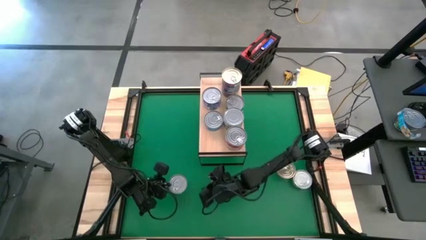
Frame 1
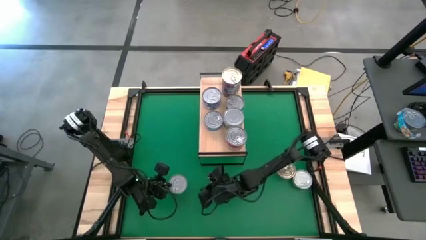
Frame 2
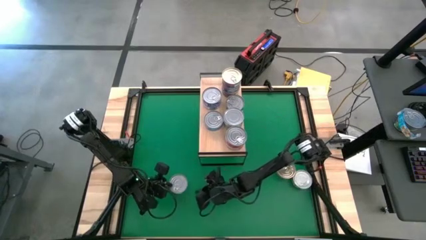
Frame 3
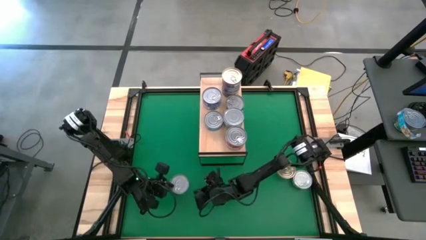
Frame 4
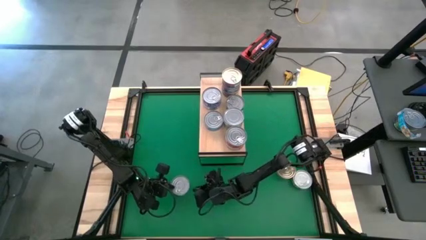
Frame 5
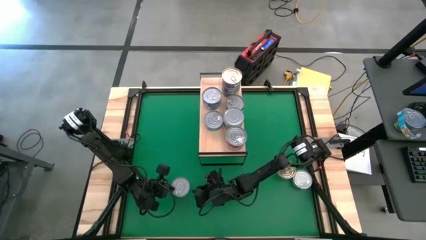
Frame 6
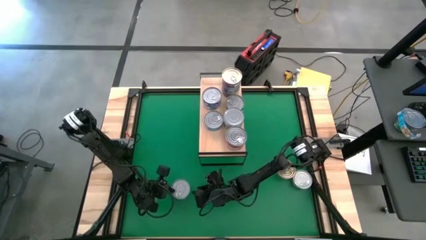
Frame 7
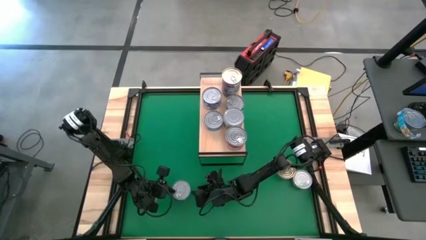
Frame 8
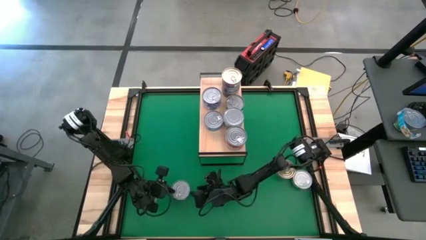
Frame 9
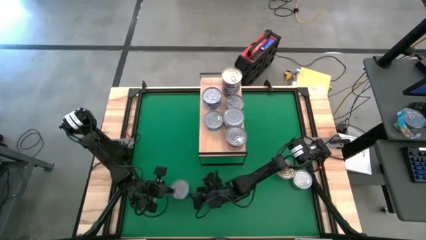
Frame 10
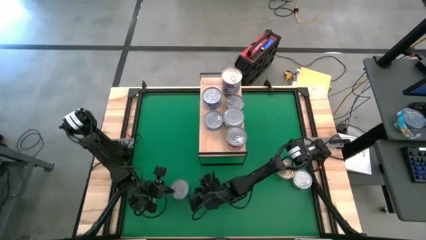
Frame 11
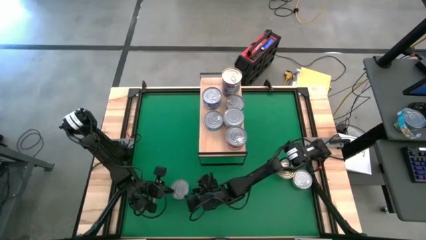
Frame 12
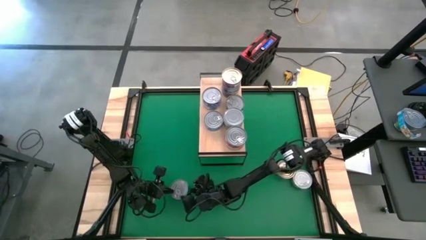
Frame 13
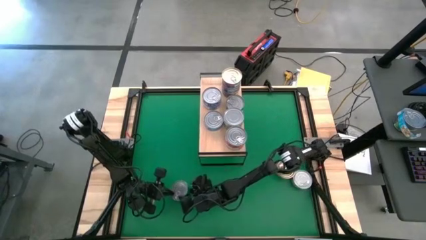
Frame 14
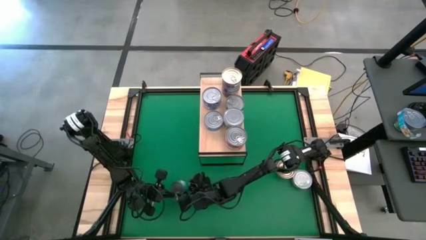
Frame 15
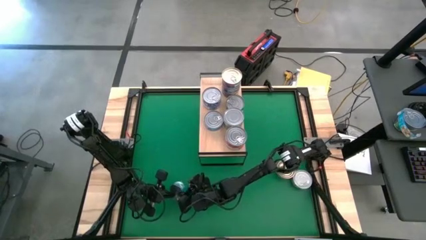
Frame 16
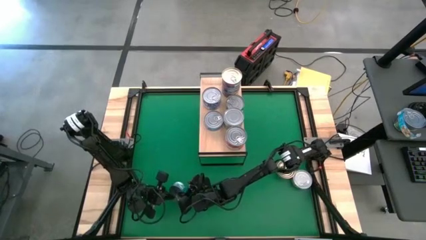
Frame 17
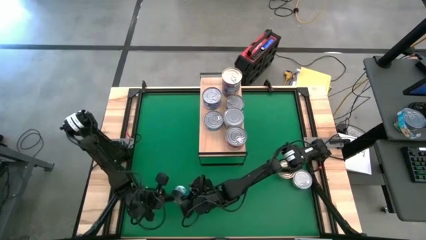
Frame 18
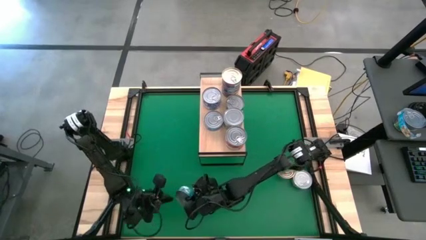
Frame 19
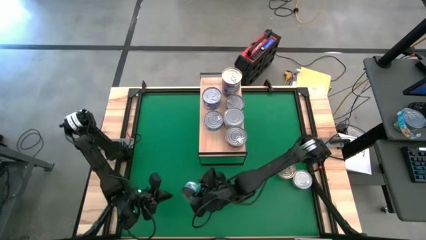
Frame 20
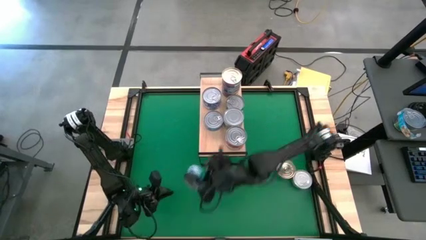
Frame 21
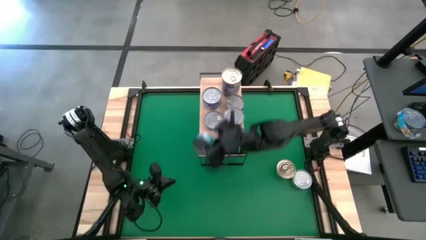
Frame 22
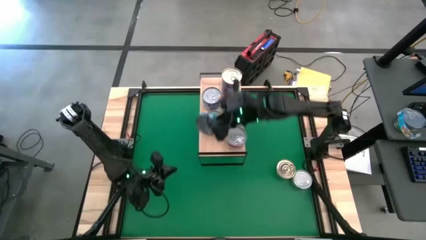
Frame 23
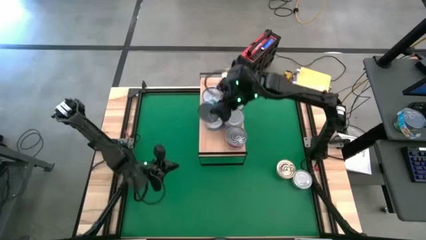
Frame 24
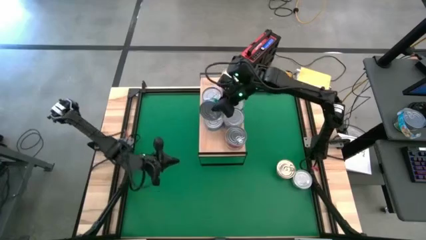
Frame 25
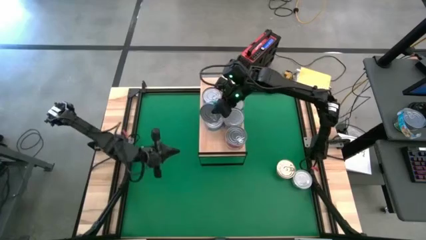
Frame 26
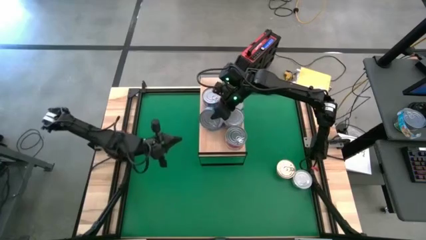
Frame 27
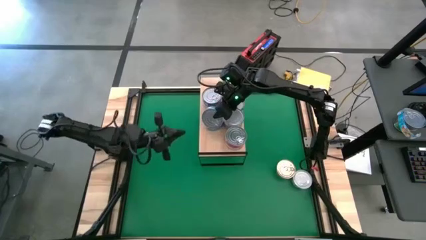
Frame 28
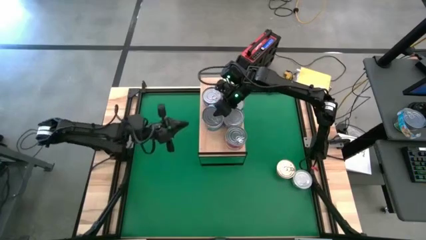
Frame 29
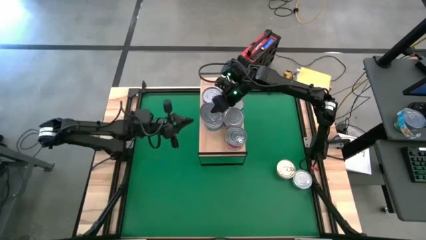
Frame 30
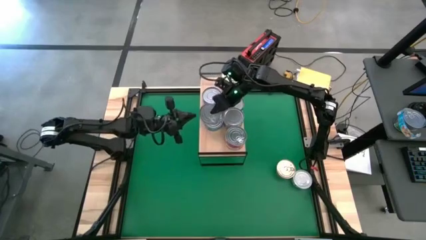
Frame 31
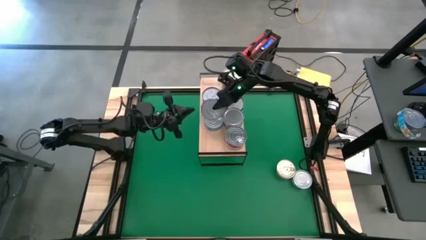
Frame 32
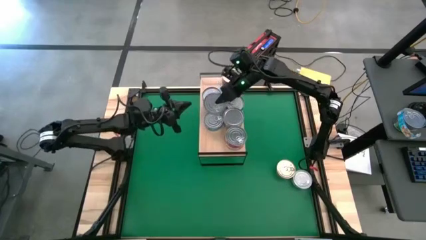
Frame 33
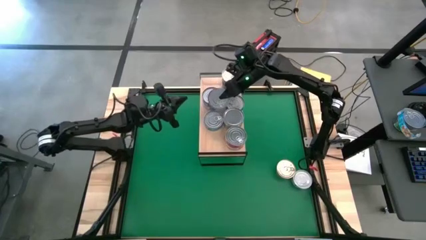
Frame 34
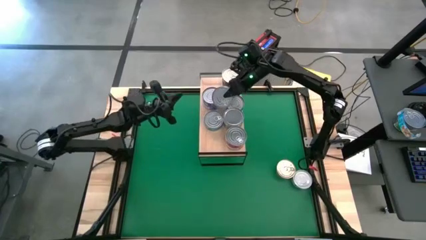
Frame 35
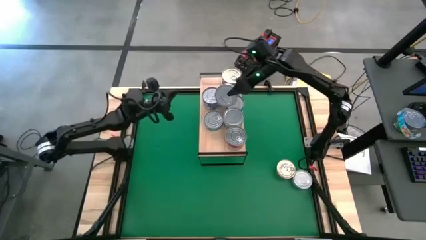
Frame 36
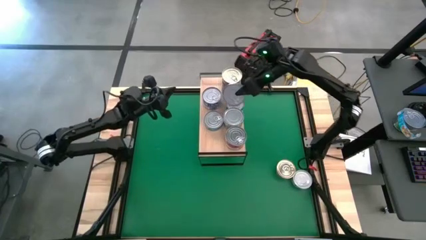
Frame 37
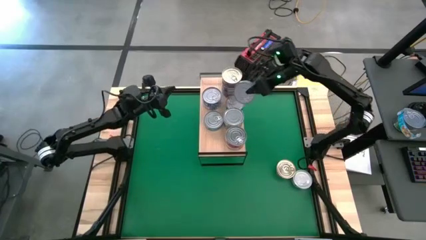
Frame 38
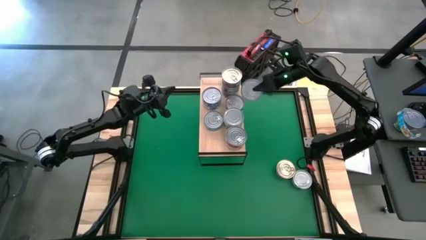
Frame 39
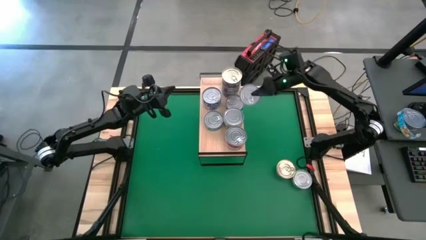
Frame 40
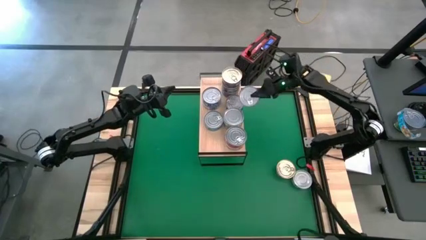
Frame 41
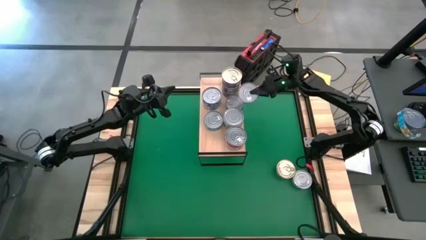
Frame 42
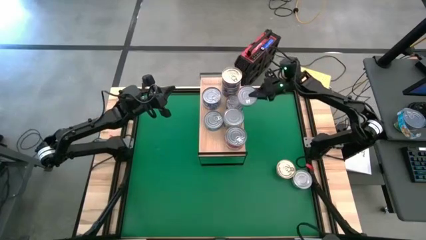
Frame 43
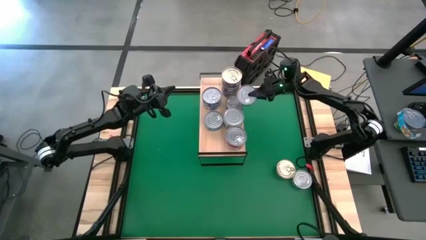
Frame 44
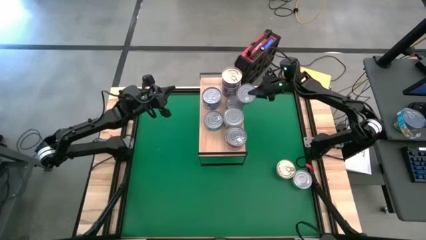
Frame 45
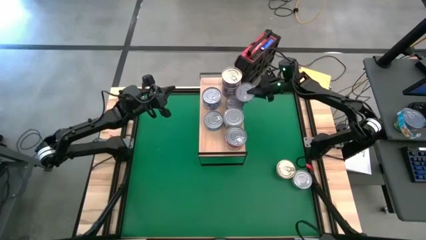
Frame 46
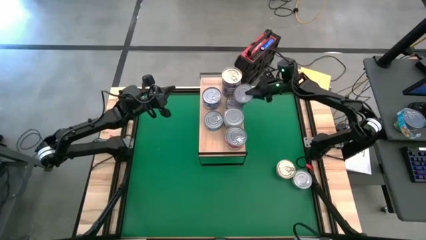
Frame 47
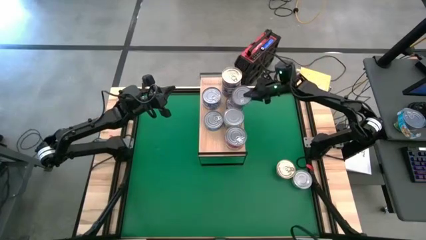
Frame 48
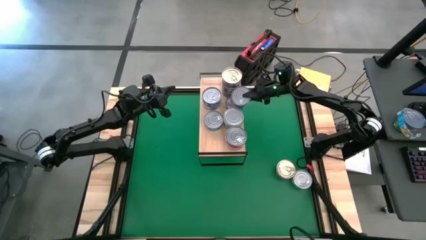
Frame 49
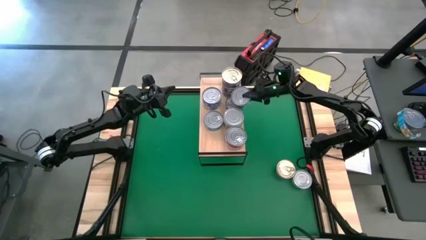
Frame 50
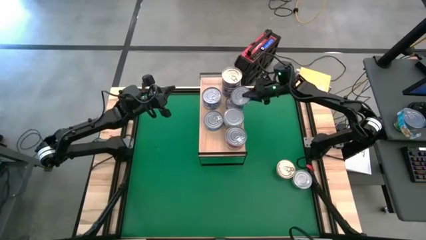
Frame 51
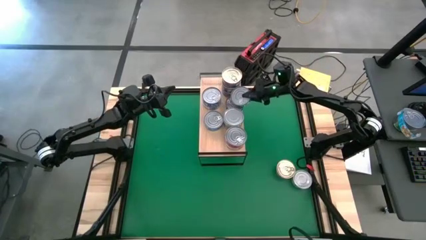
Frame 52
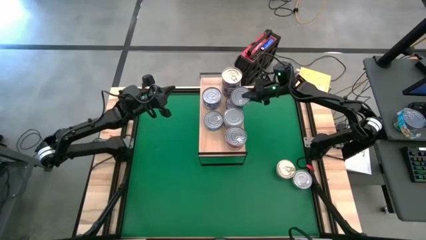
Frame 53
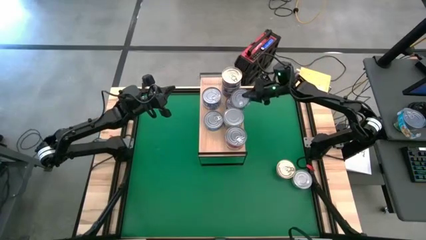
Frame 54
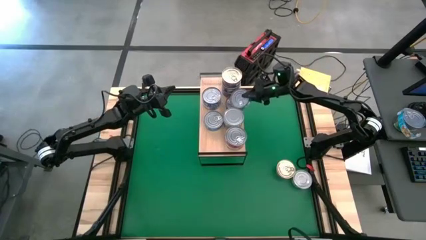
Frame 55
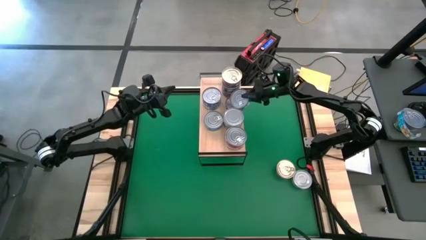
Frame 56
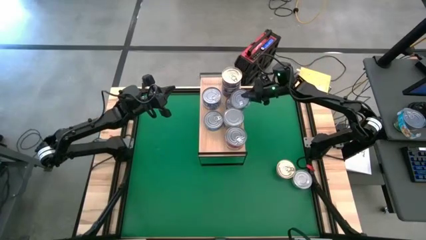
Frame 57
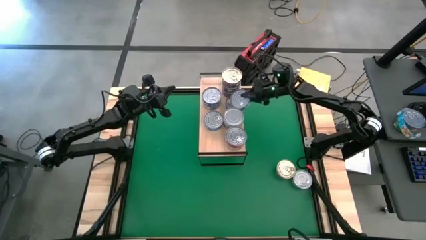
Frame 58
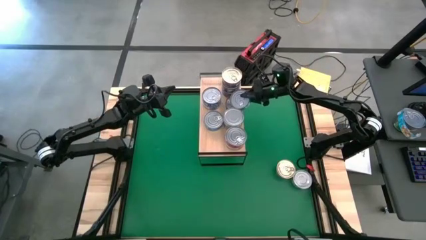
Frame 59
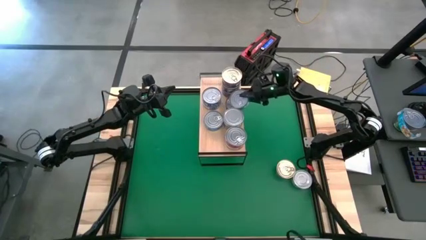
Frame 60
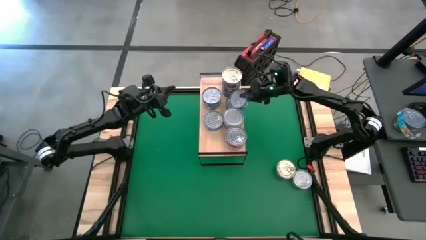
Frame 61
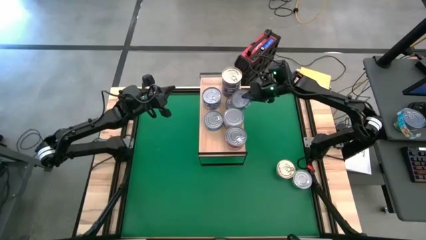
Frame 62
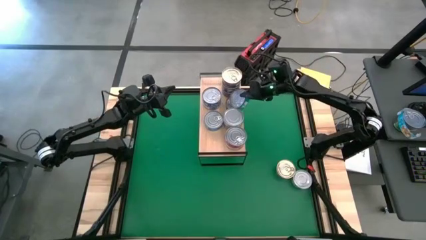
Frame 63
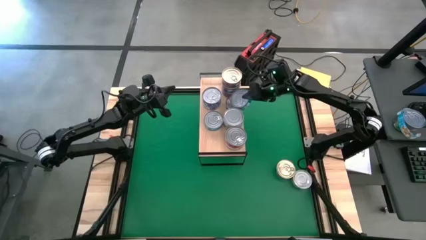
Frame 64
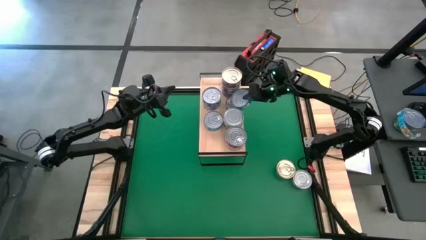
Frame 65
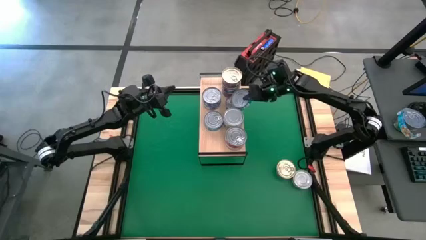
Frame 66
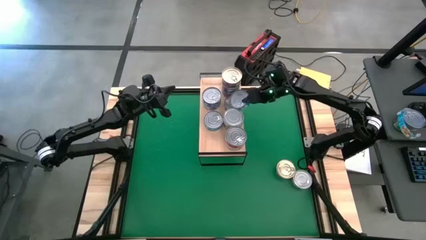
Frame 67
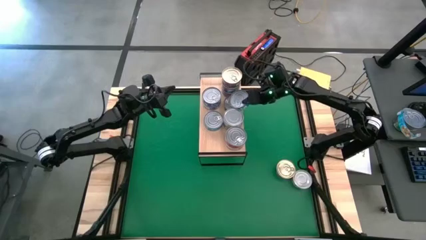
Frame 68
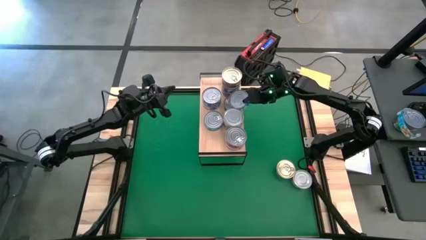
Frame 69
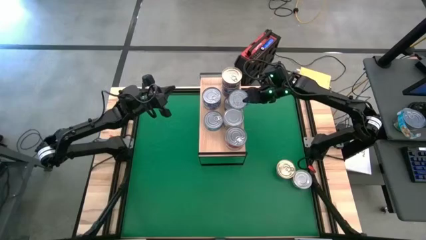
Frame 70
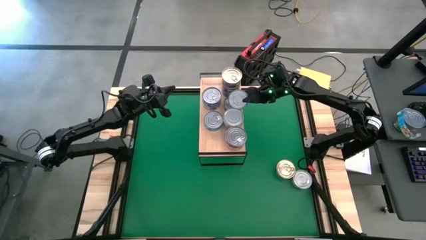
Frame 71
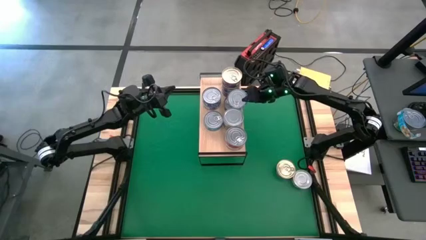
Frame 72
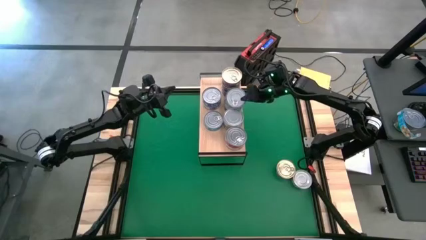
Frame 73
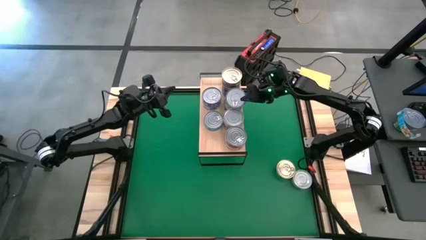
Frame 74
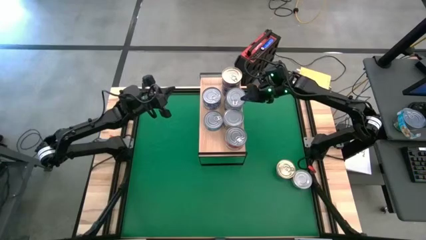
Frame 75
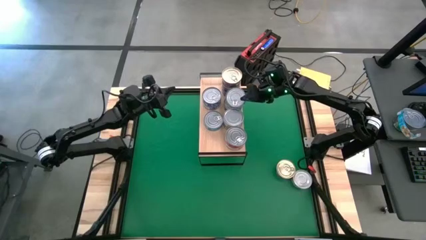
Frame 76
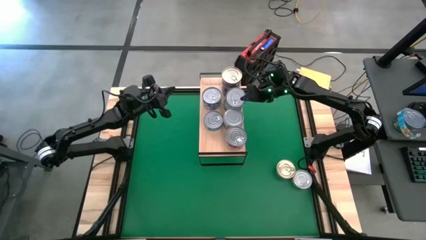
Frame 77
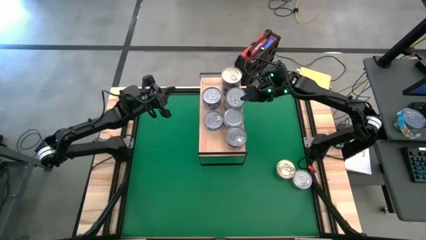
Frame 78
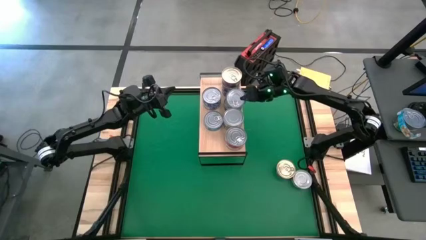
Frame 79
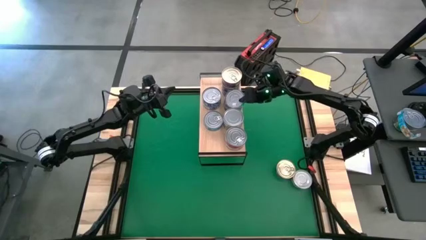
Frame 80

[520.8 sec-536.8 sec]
Task: Stack canned seafood by type on shelf
Stack the light blue tuna can on top of the light blue can on the shelf
